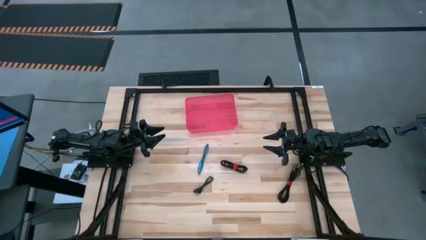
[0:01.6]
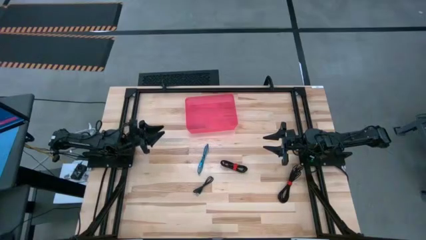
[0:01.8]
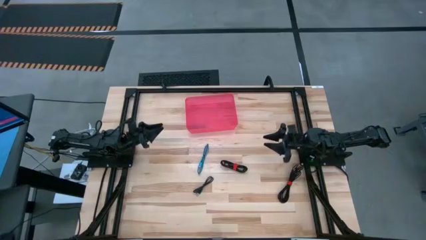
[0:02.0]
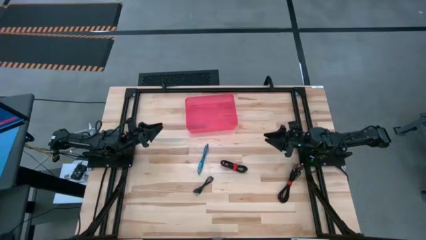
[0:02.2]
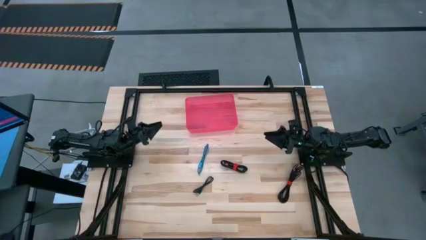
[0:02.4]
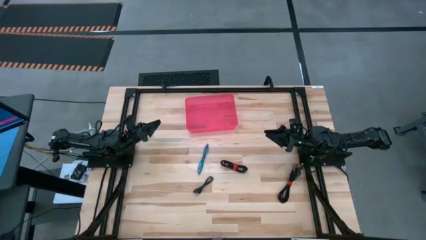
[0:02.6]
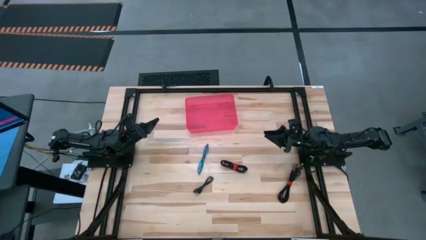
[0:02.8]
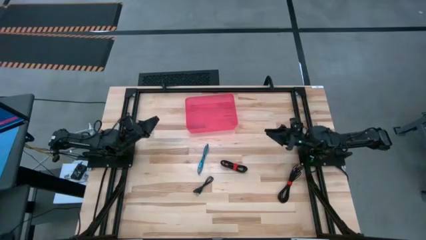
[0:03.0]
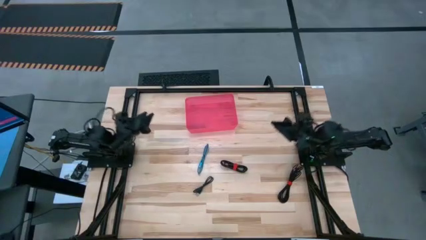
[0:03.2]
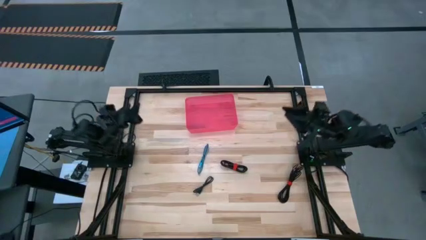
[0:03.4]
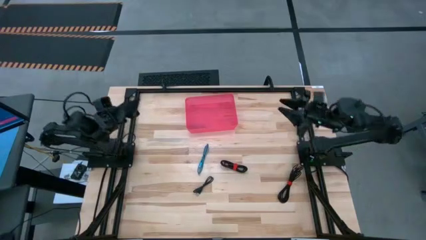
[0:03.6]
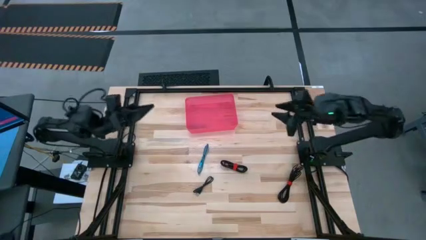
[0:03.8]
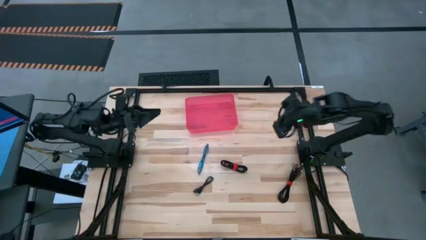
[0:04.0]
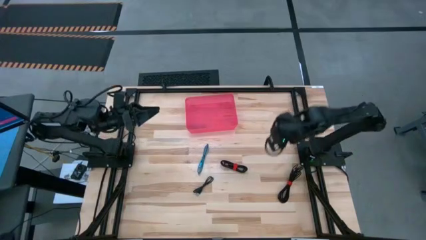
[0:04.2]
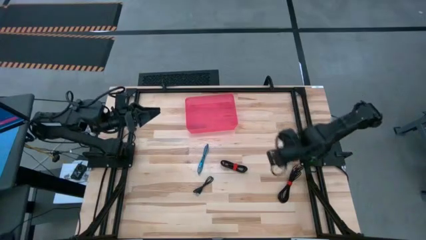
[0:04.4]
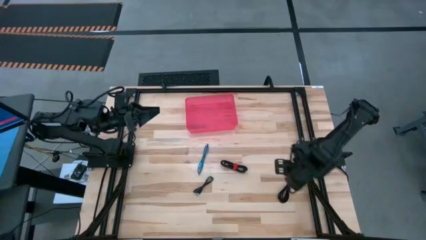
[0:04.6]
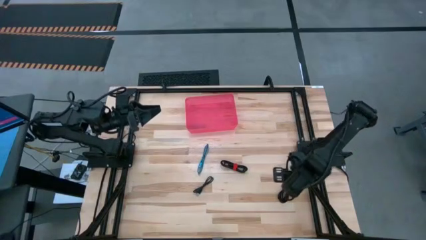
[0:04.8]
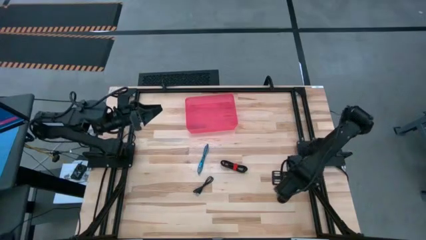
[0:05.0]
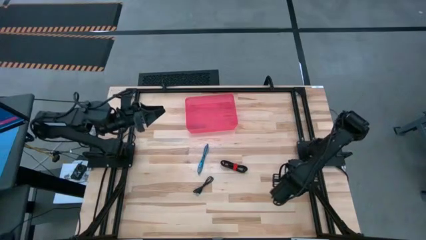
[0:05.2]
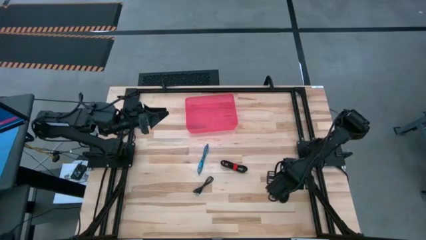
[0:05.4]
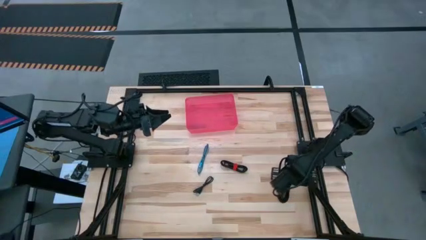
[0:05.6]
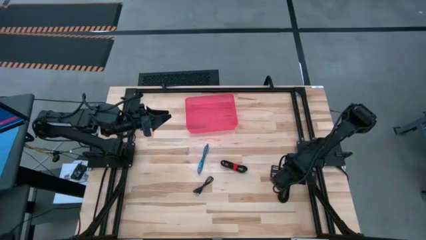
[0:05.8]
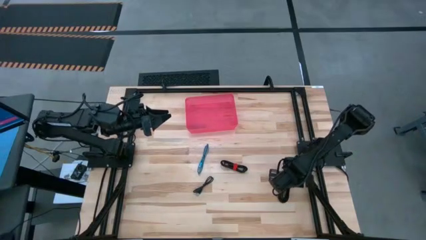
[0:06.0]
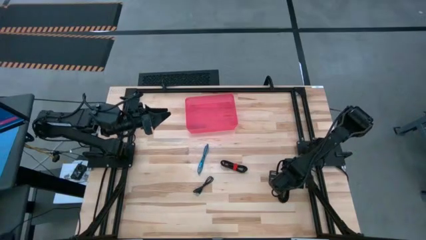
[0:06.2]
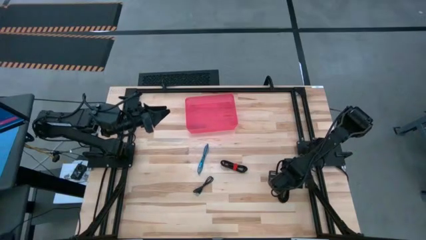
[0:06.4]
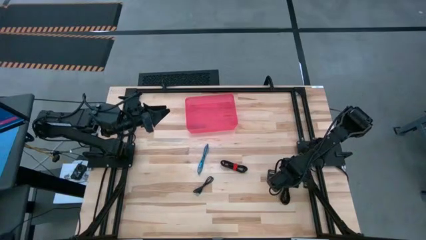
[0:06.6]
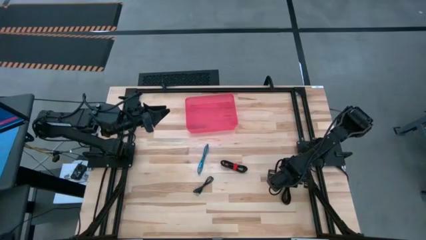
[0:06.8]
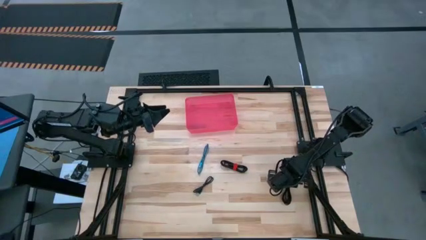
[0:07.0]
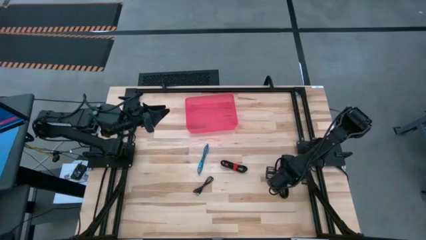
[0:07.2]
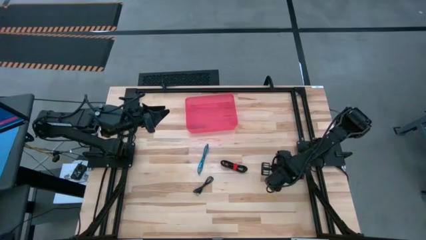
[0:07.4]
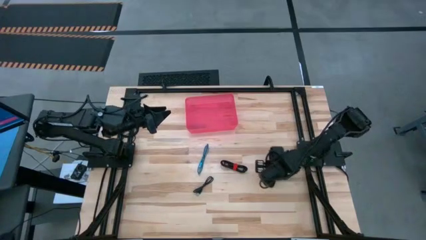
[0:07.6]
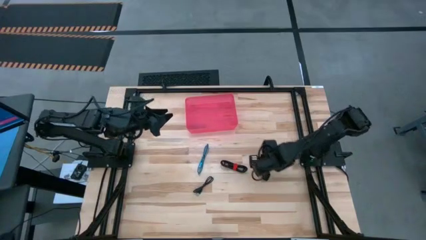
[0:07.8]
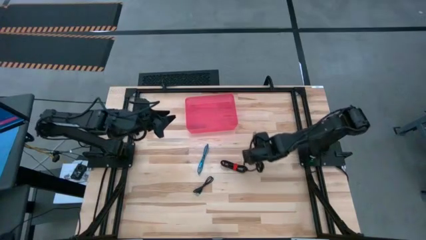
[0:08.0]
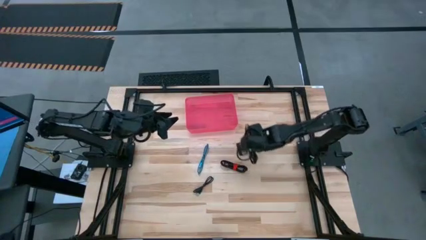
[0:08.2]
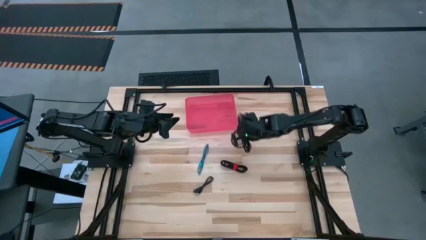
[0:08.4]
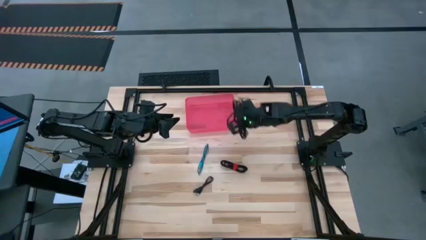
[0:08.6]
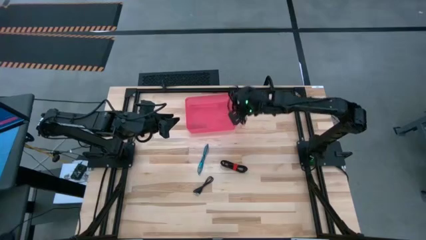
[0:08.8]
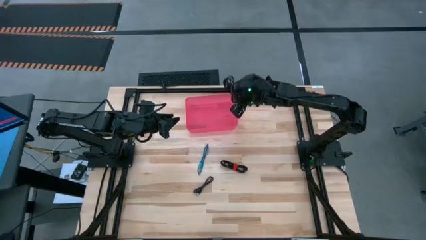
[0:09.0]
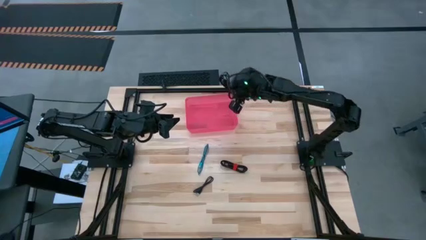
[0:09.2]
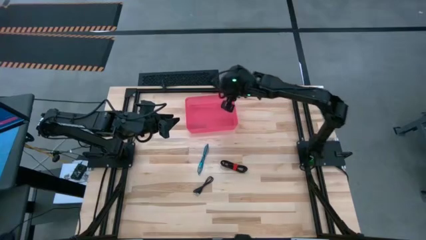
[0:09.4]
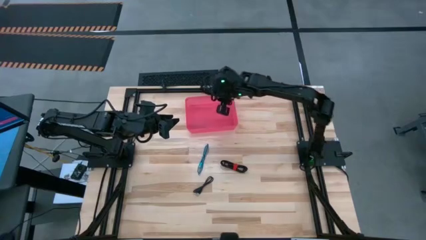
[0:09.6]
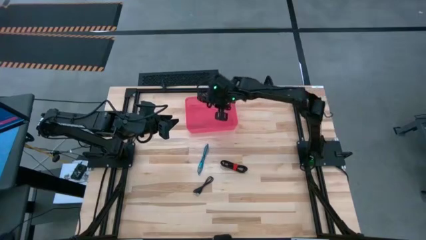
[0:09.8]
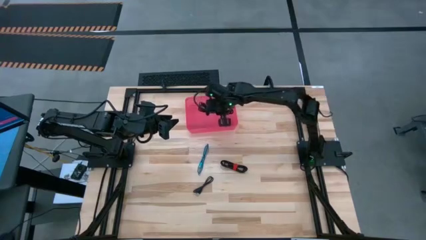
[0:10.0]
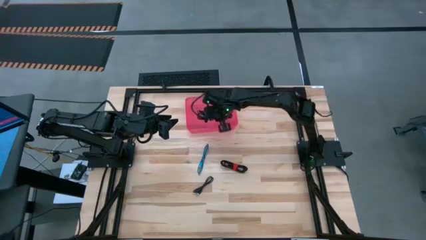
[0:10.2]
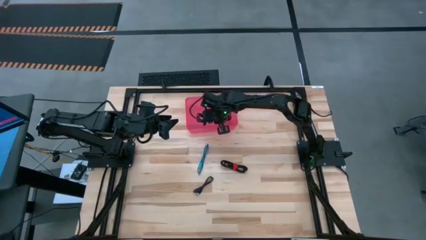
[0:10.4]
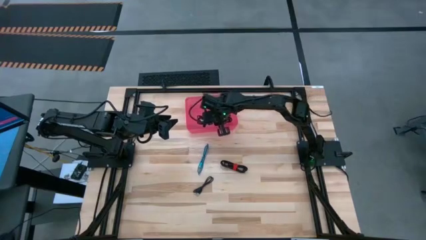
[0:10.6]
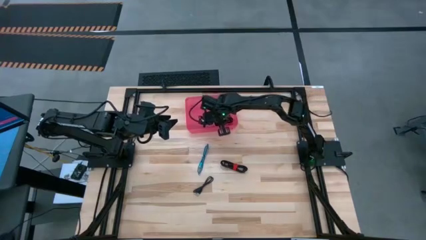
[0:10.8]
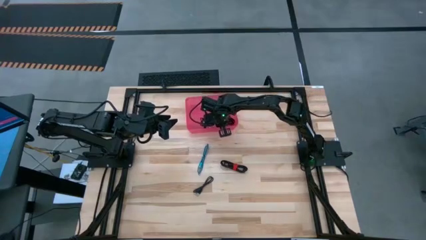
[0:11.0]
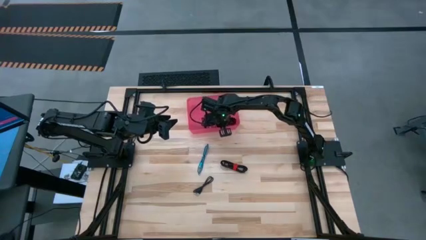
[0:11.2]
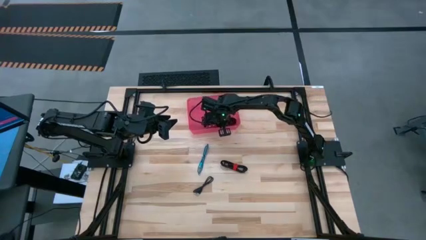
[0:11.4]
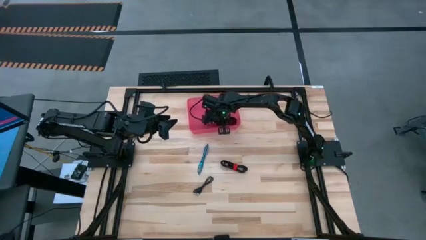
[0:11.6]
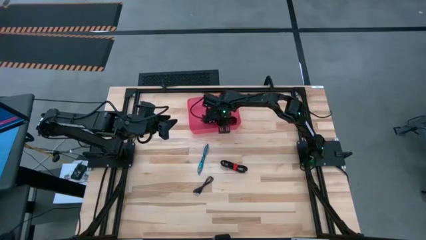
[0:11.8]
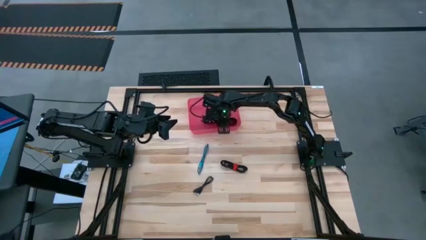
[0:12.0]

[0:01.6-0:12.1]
Task: Pick and place USB-C Cables
Put the right black charger cable into the pink bin

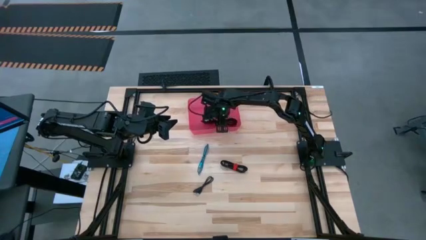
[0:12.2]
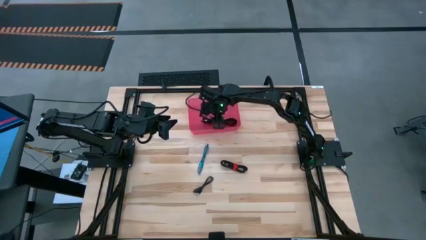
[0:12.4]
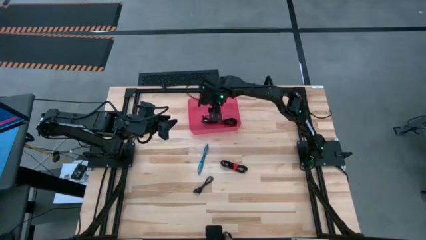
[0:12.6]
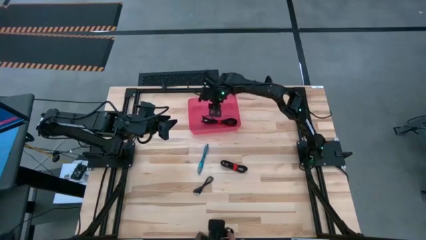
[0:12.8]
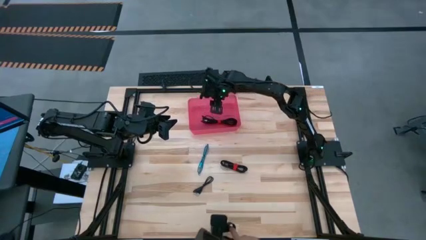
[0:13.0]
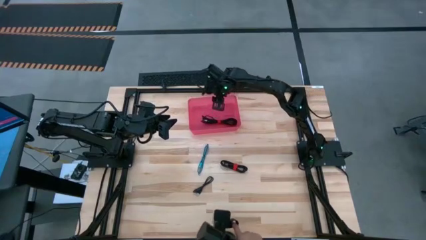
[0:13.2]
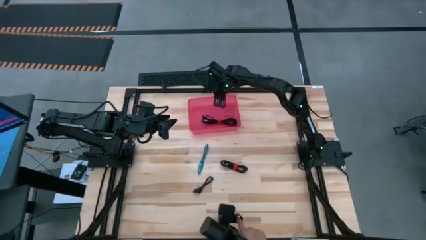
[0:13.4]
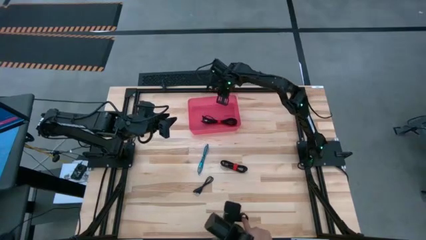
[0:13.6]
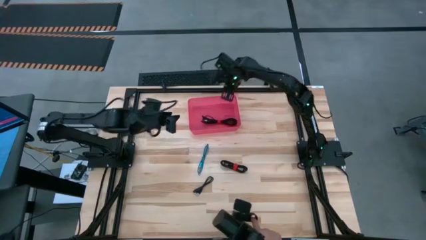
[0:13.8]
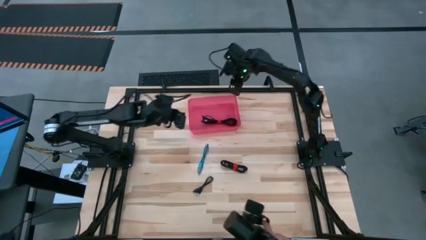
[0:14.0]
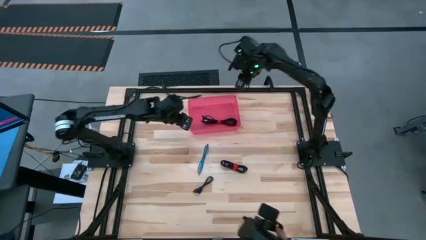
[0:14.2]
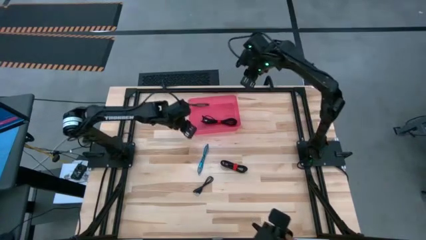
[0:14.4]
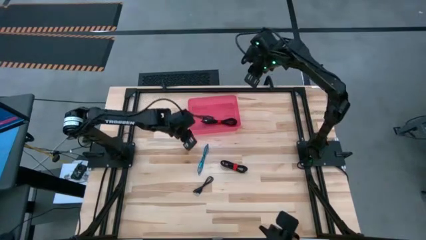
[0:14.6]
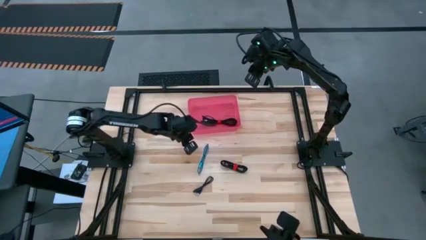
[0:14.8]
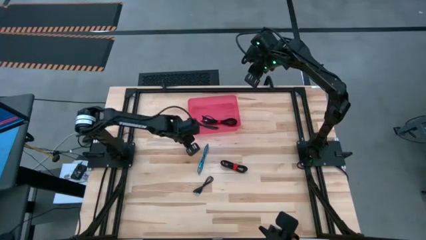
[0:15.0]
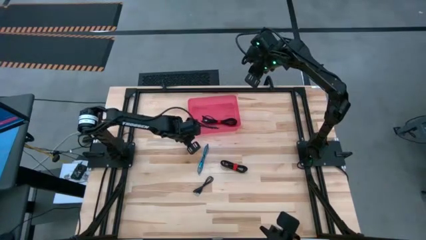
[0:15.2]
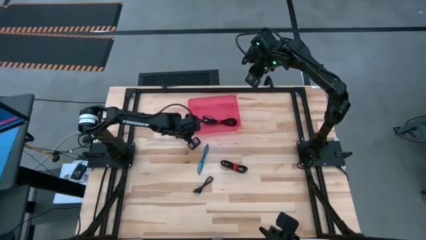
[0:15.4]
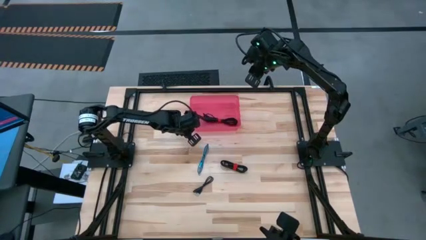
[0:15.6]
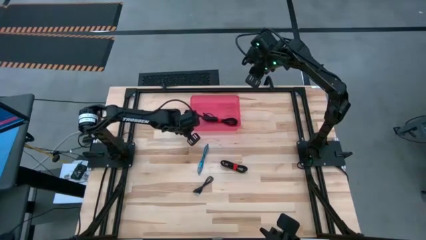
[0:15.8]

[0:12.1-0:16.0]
Adjust the pink bin

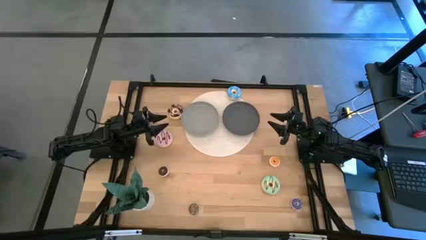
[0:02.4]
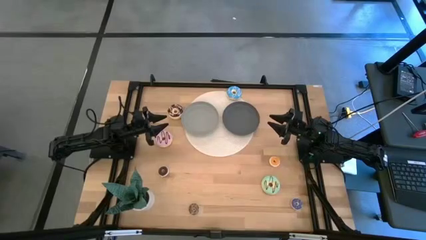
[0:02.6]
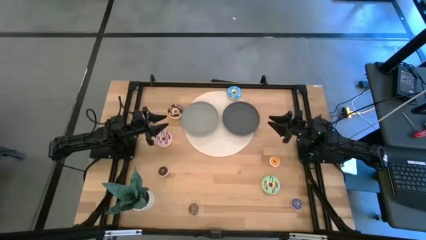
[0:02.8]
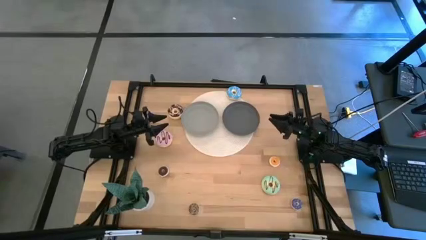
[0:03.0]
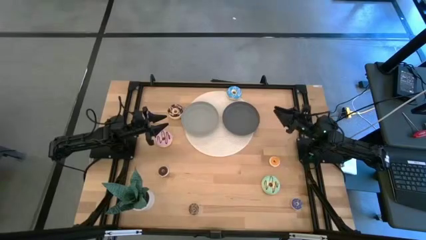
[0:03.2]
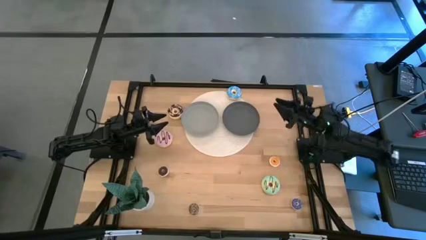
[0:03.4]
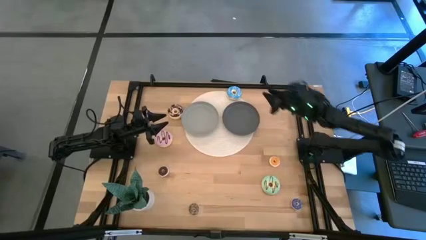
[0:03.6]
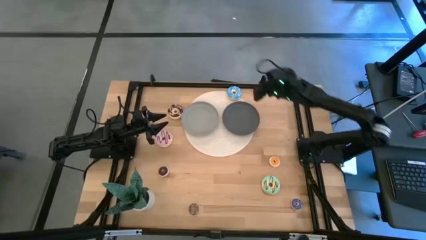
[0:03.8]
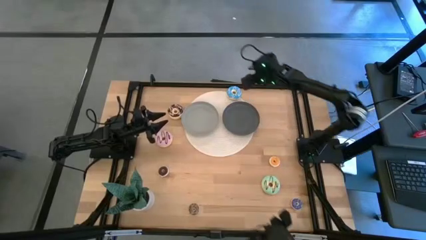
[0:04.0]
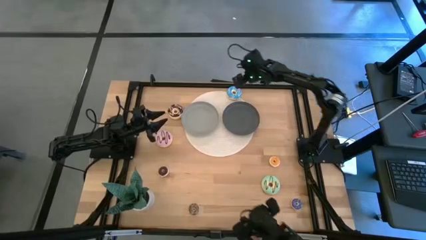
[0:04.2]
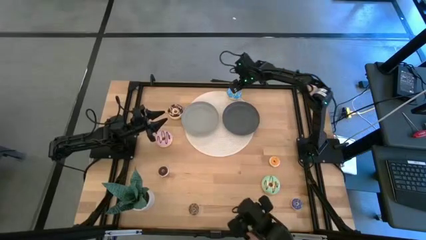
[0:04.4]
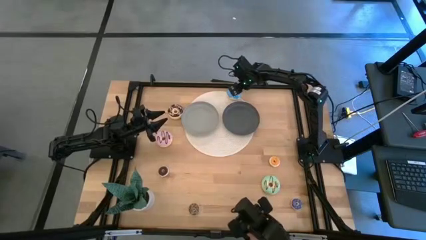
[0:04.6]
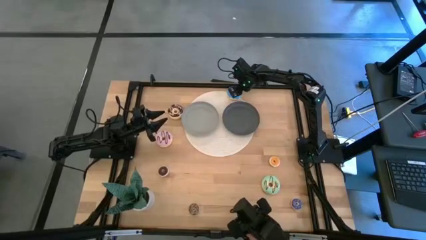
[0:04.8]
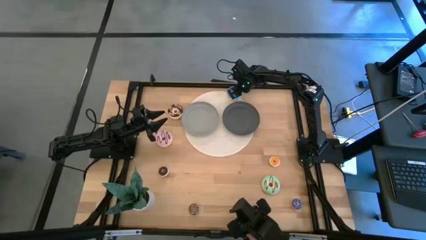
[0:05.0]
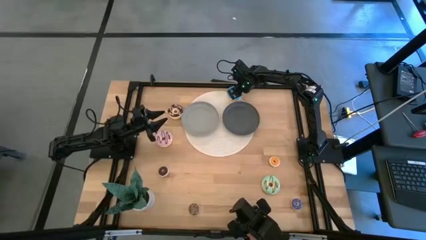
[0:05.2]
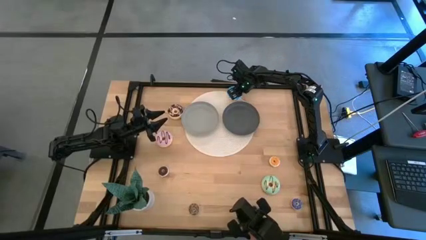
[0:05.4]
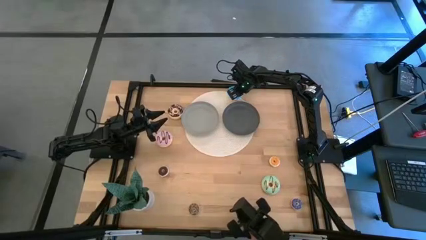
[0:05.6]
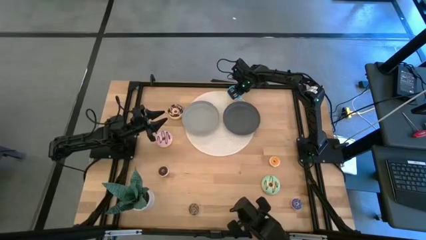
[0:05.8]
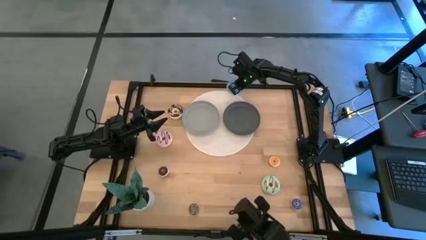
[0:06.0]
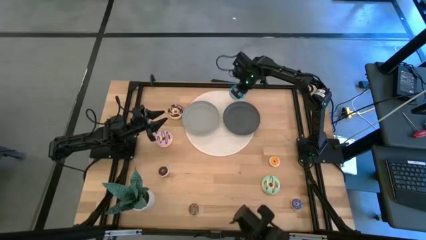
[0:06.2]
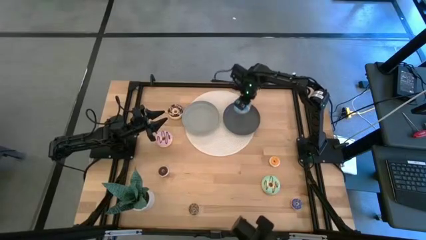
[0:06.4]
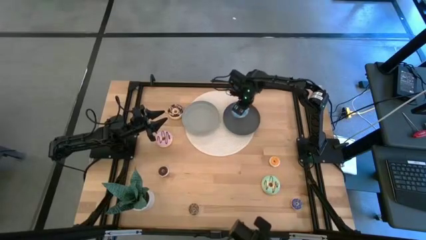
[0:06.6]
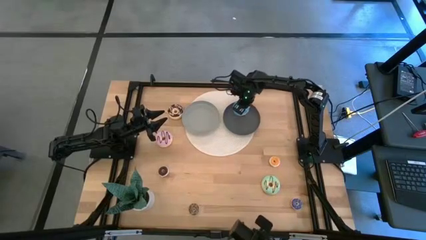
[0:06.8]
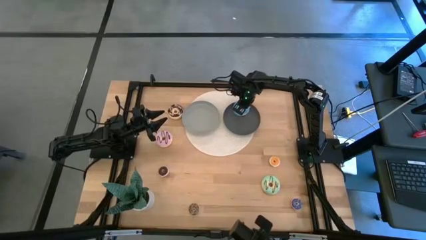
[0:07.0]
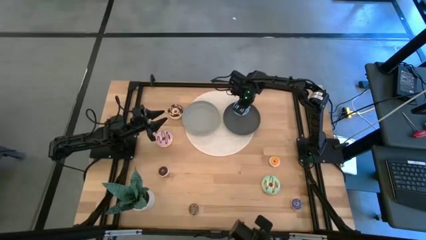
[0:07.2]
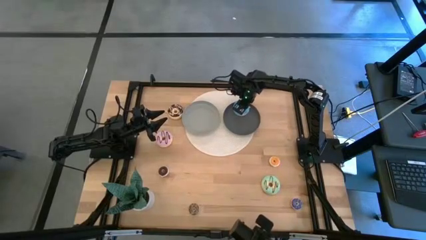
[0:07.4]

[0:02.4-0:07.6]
Task: Pick & Place donuts
Put the large blue donut on the dark gray plate
